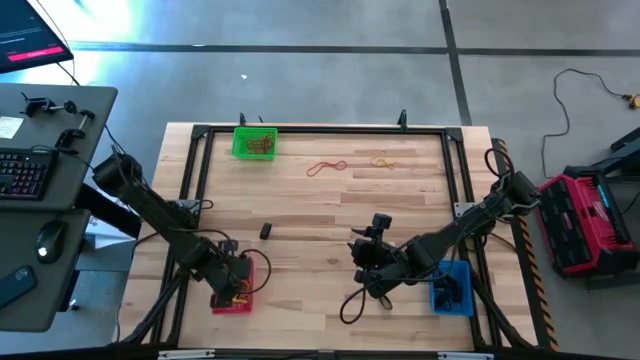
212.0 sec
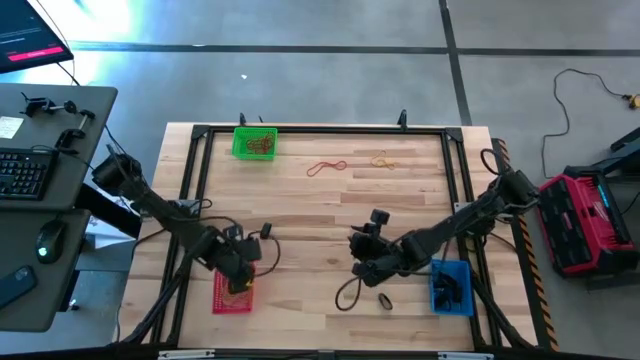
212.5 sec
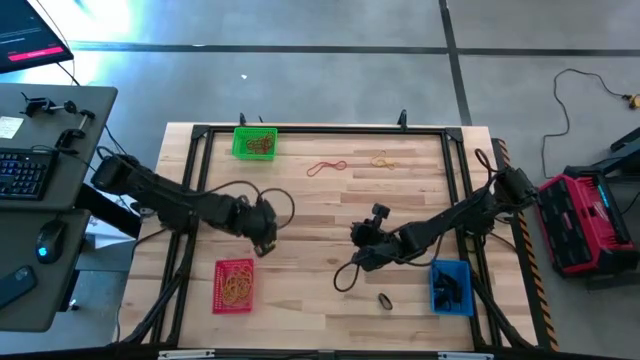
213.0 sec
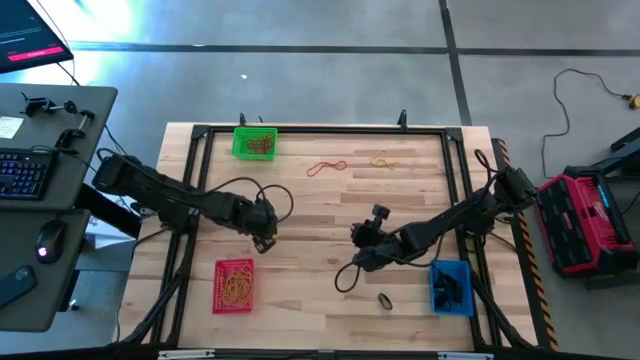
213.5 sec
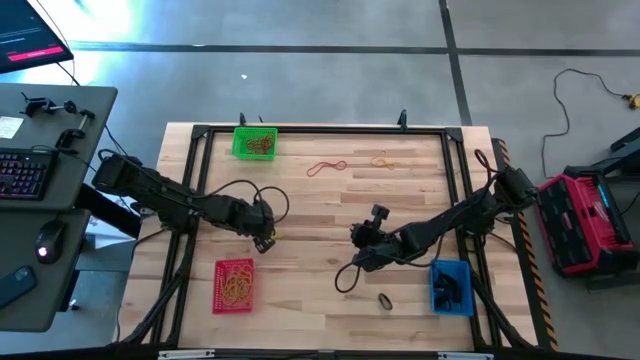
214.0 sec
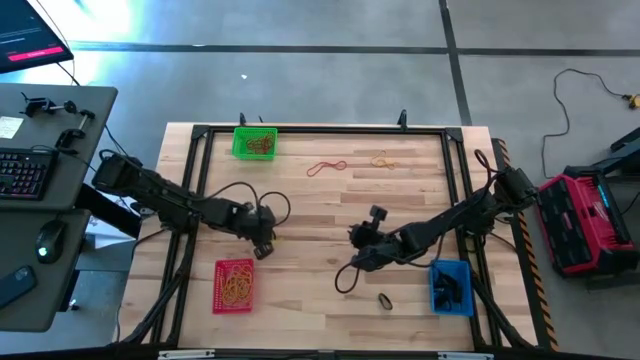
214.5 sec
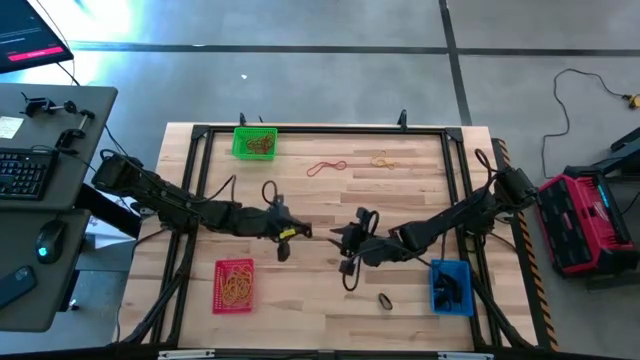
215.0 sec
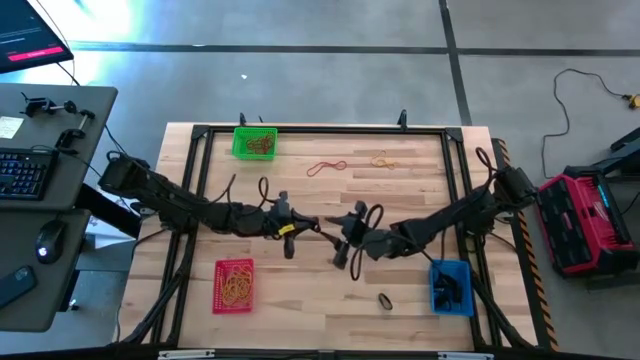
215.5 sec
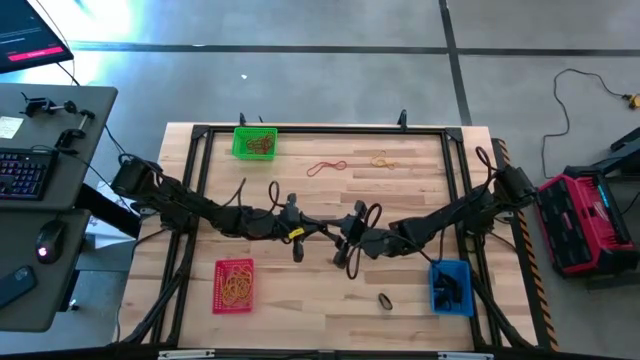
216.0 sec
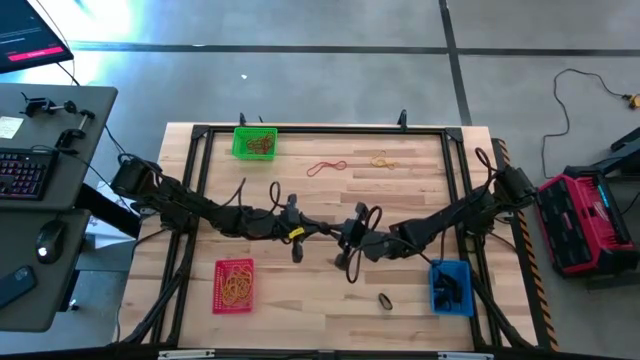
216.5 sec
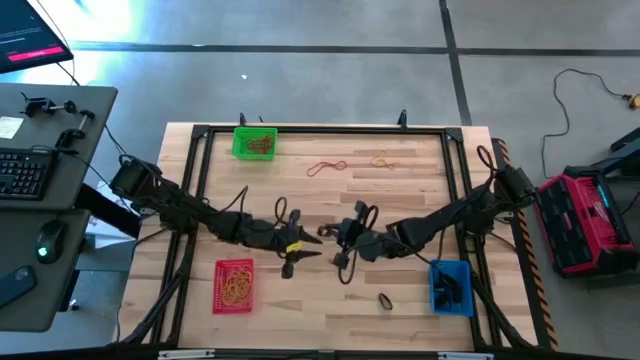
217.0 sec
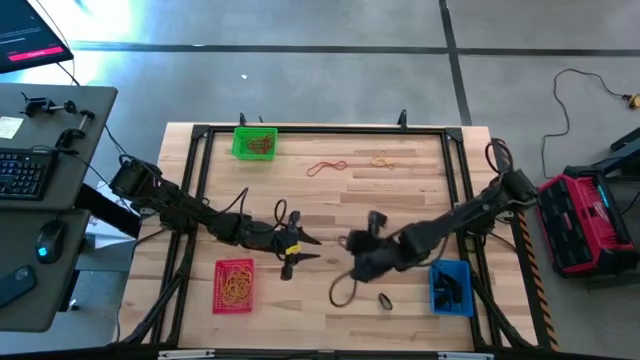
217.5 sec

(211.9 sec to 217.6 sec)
Task: Sort rubber bands into baskets
Put the black rubber band into the blue bin

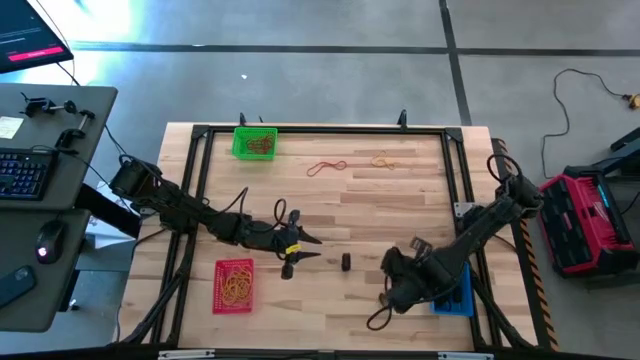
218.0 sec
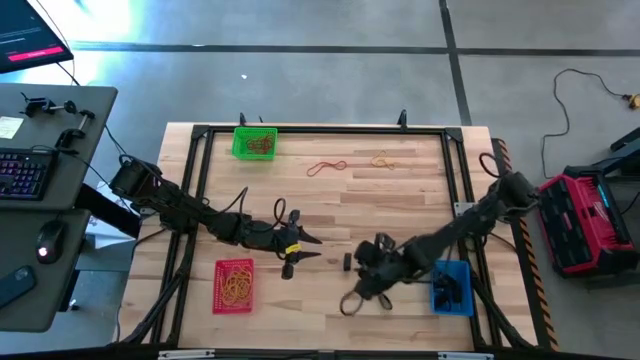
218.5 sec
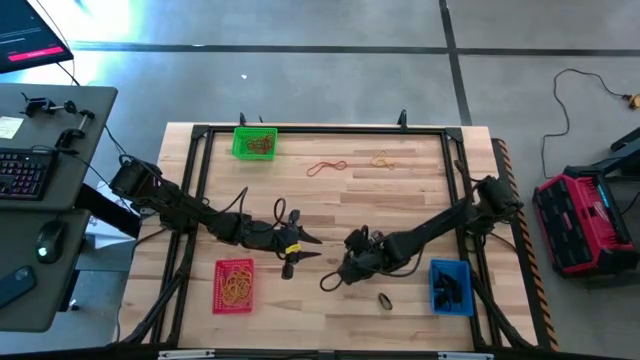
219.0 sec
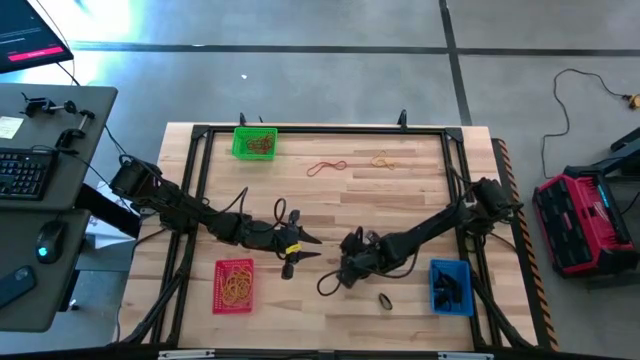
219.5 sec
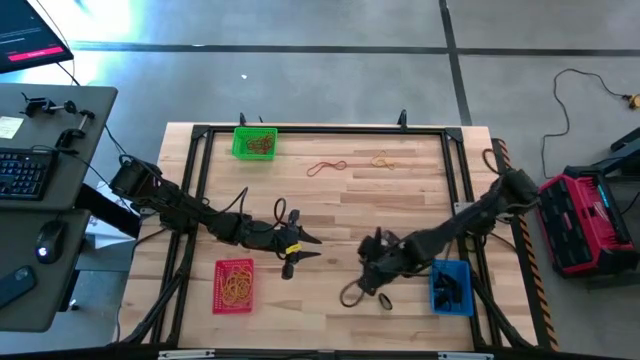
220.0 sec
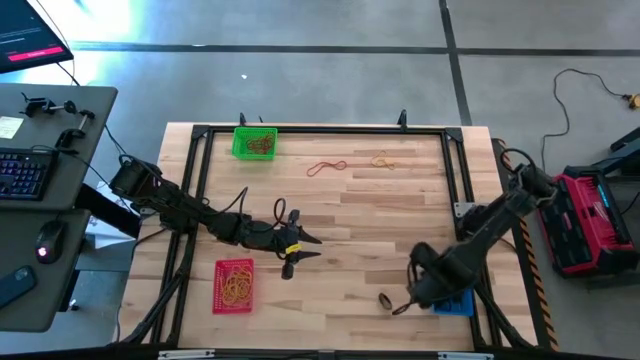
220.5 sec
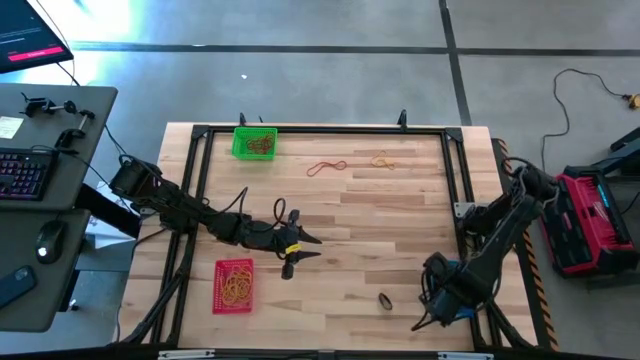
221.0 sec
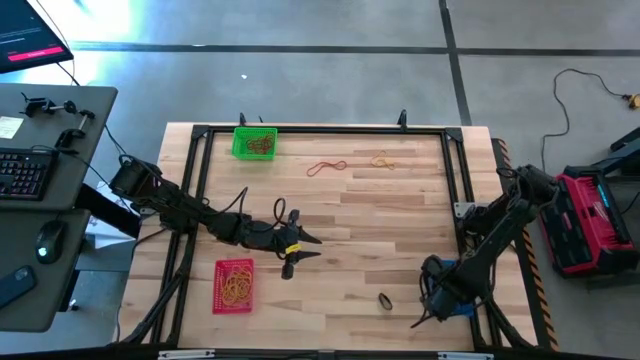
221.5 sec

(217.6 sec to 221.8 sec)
Put the black rubber band into the blue bin

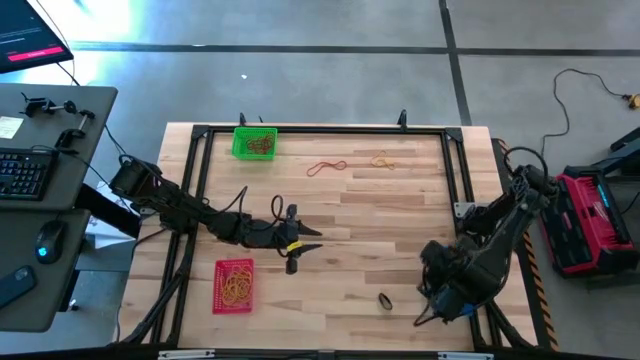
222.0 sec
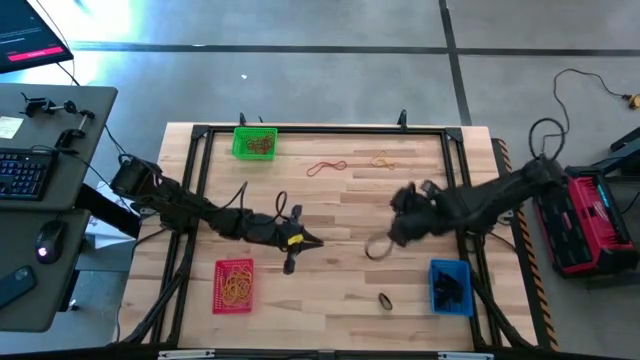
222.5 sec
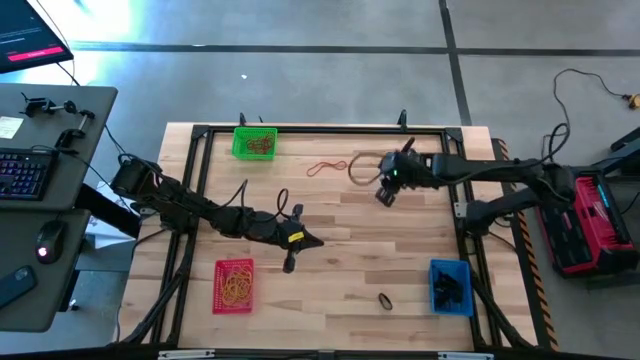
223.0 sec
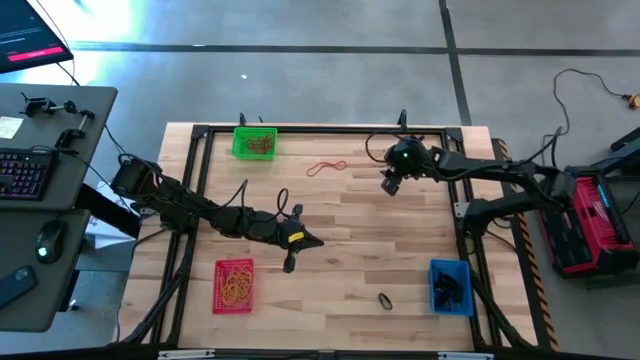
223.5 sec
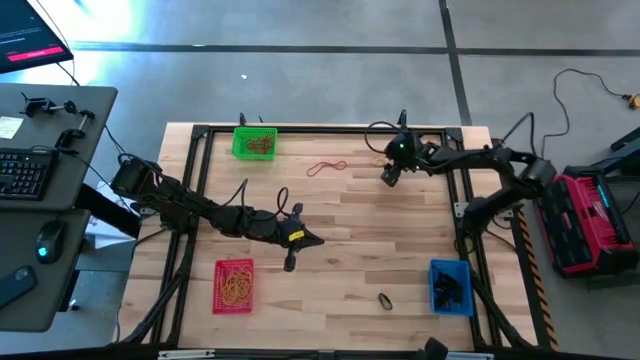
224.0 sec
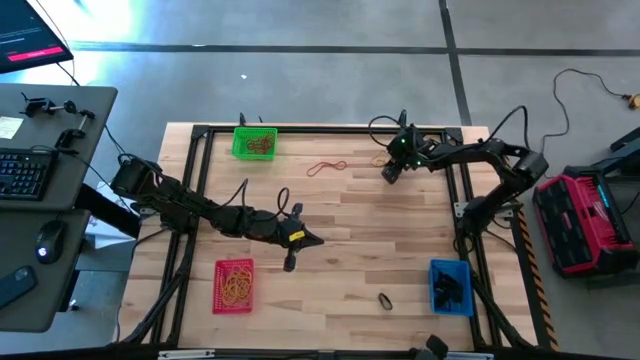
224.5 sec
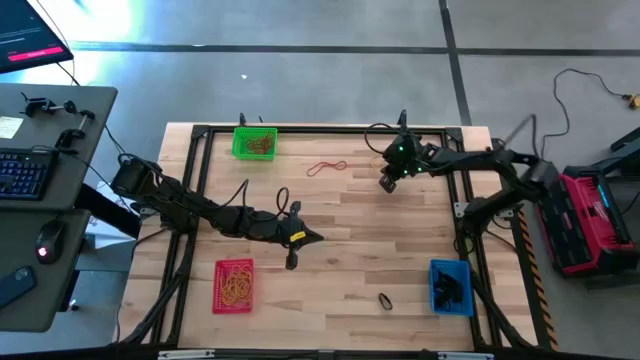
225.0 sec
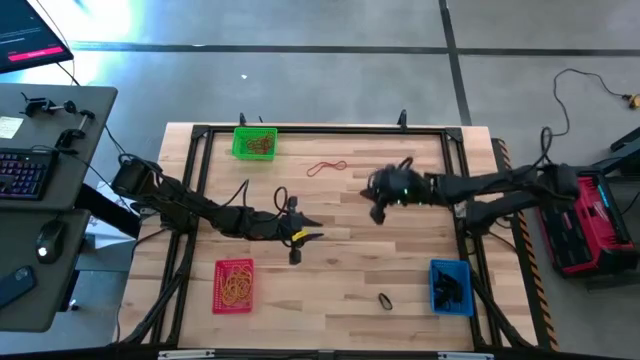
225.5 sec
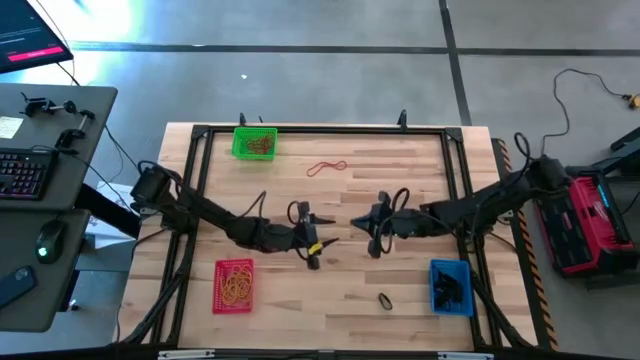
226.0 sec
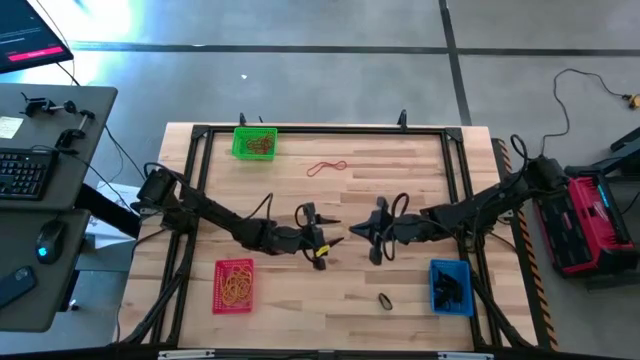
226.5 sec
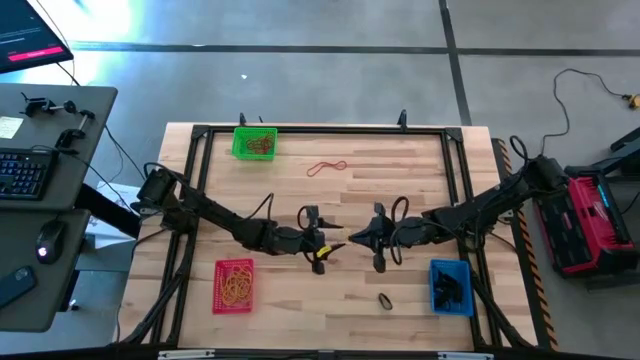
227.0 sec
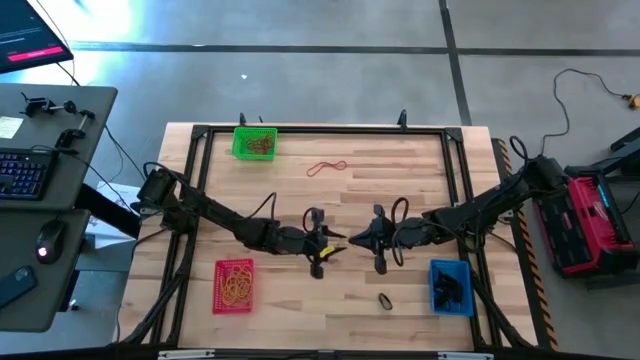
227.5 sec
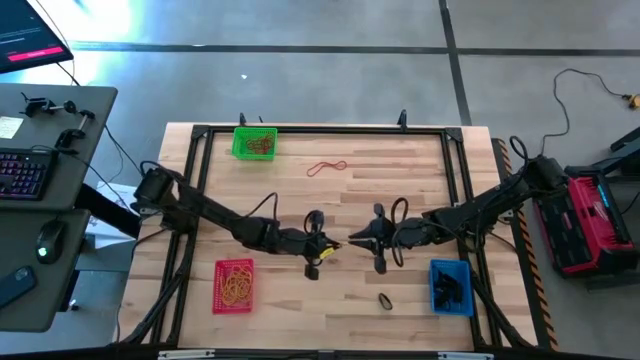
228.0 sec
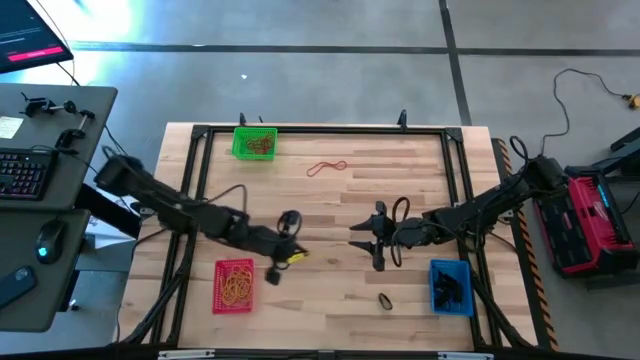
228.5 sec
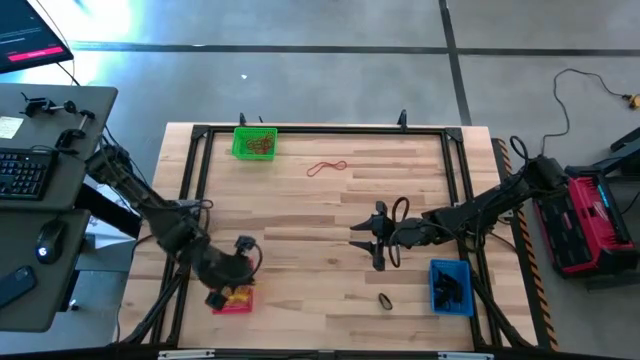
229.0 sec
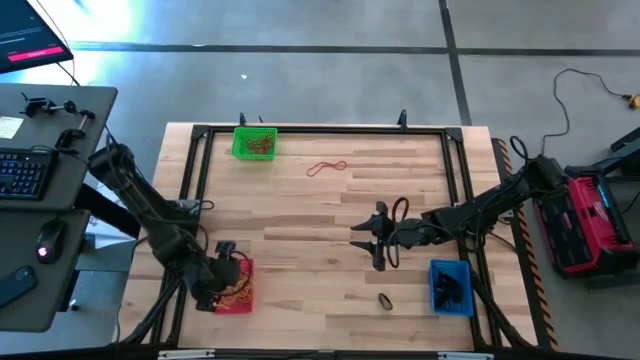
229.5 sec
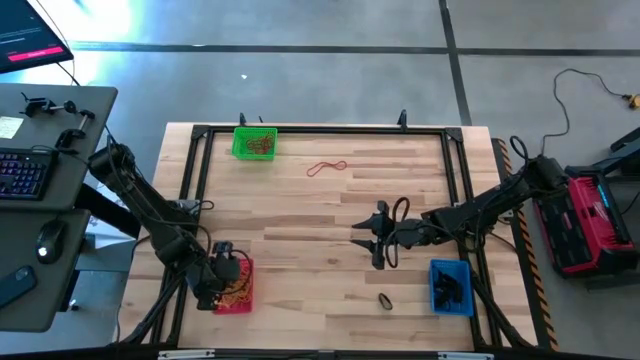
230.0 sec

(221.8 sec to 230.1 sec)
Put the yellow rubber band into the red bin

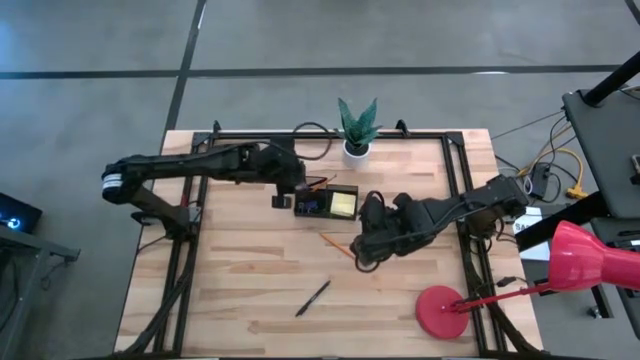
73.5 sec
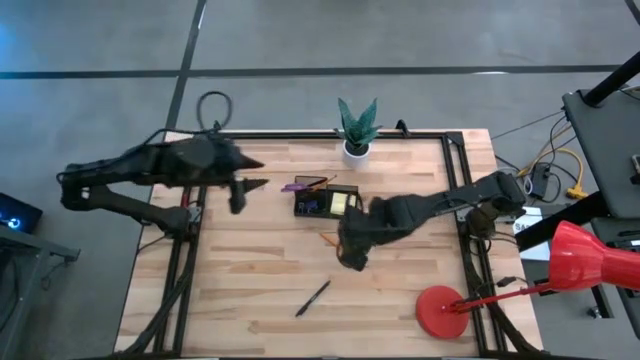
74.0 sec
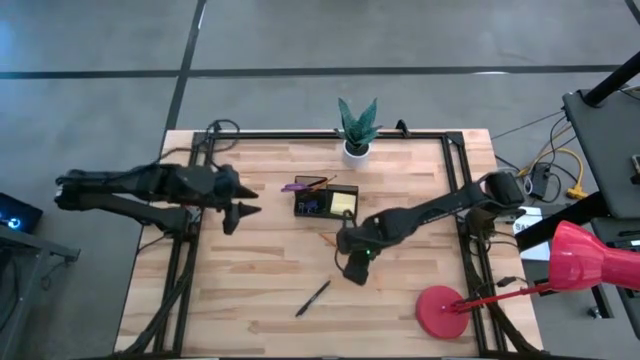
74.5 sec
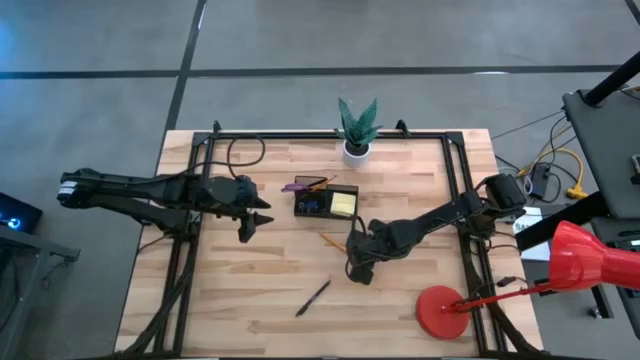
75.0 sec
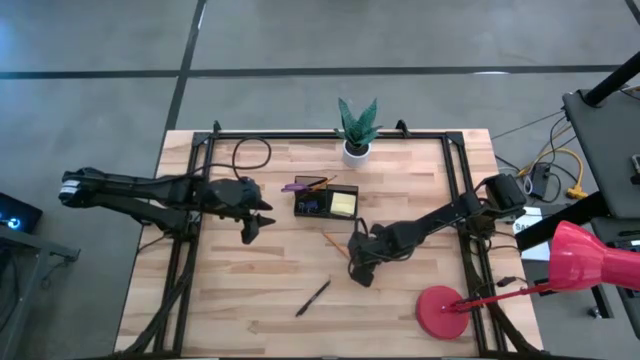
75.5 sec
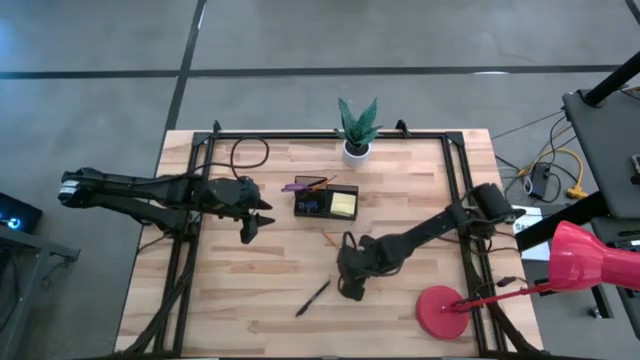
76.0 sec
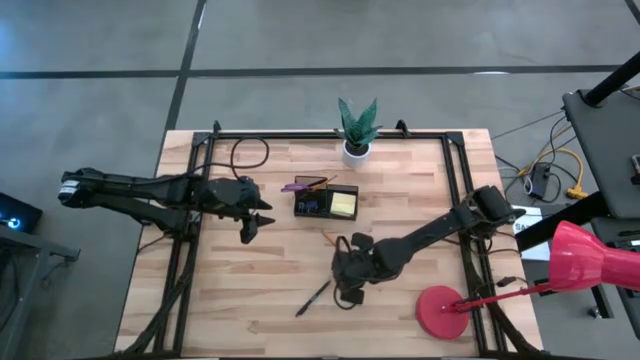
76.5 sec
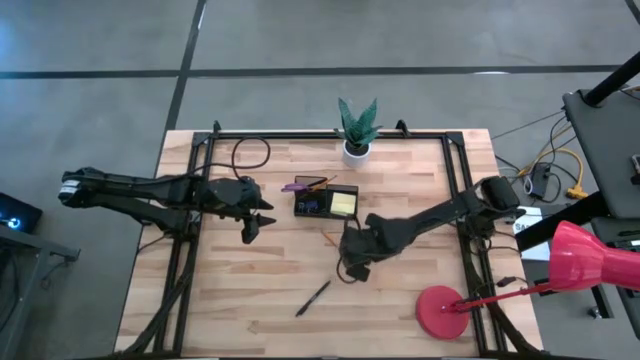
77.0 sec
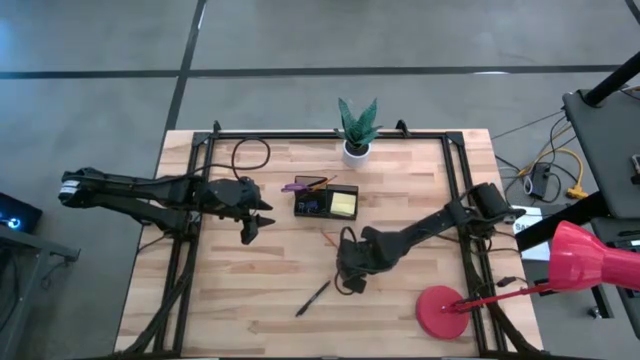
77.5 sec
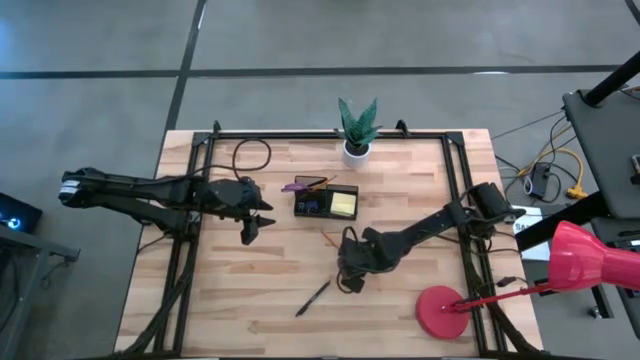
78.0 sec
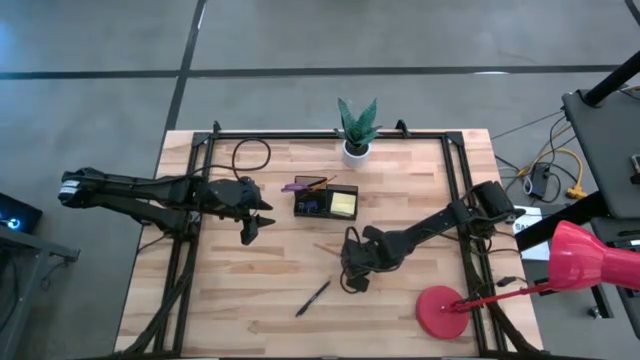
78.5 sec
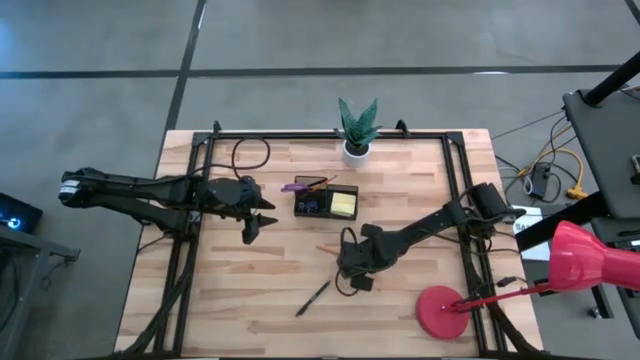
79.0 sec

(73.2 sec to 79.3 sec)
Task: Pick and place office supplies into organizer
Put the pencil into the desk organizer
